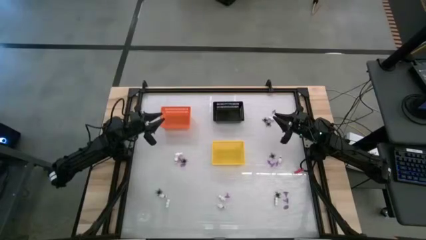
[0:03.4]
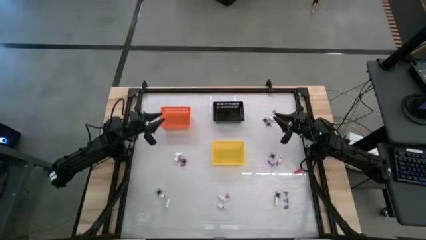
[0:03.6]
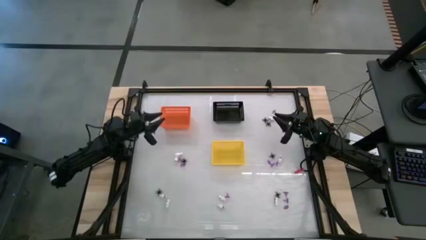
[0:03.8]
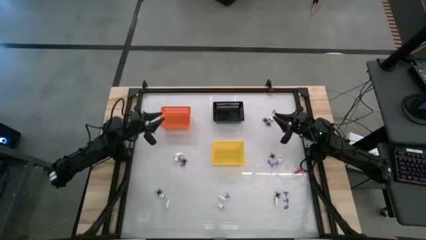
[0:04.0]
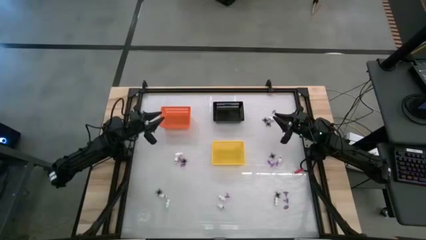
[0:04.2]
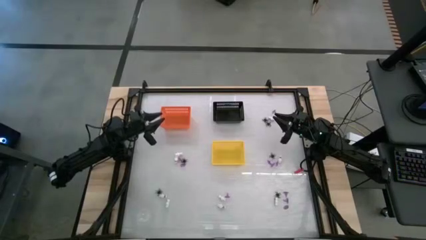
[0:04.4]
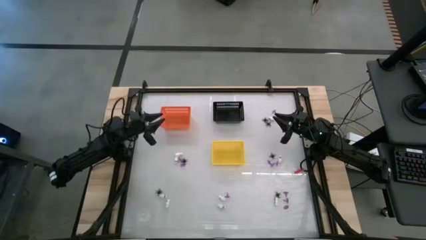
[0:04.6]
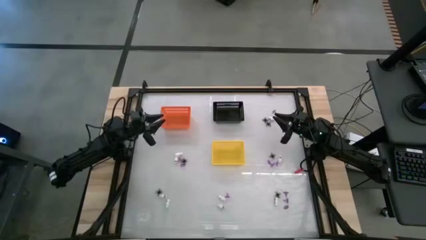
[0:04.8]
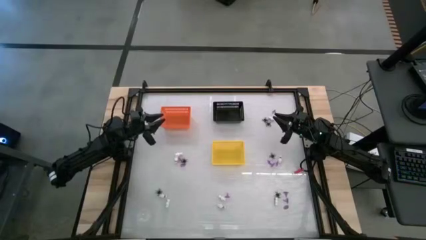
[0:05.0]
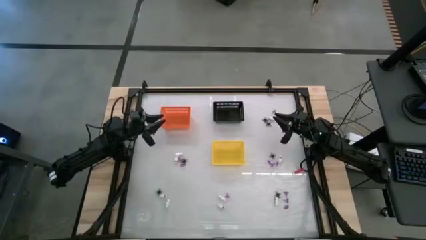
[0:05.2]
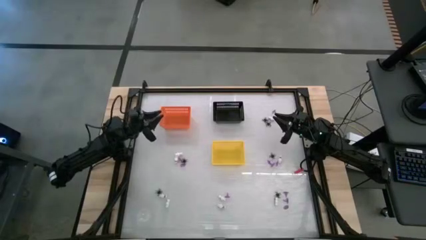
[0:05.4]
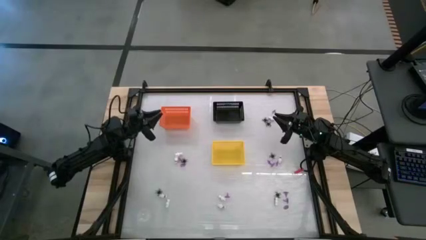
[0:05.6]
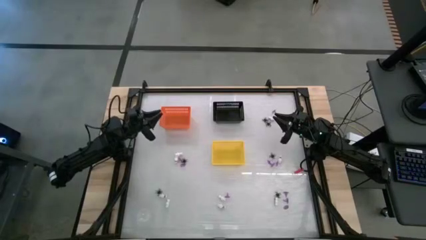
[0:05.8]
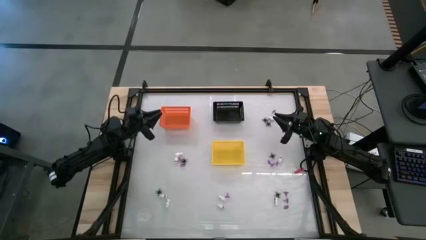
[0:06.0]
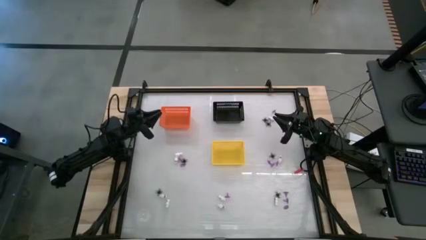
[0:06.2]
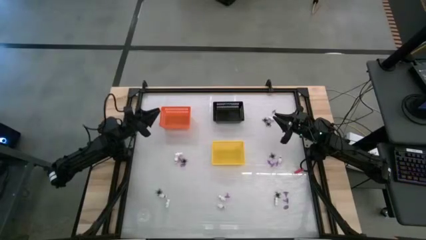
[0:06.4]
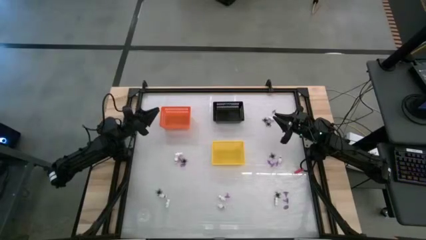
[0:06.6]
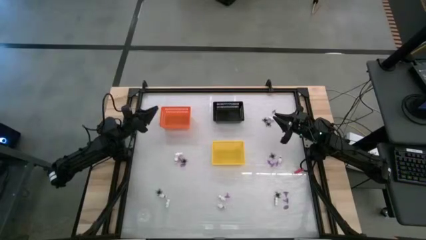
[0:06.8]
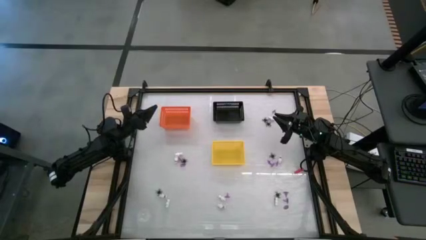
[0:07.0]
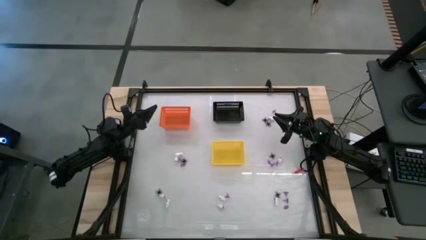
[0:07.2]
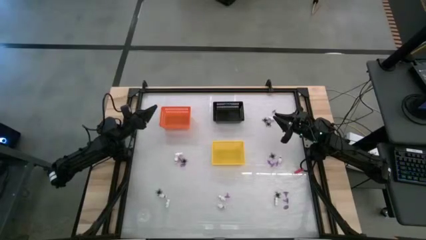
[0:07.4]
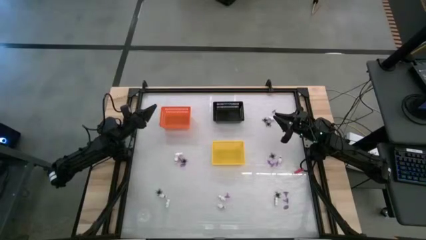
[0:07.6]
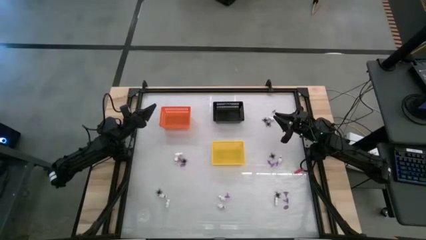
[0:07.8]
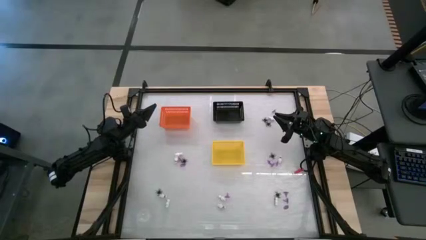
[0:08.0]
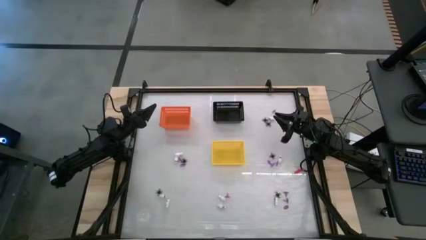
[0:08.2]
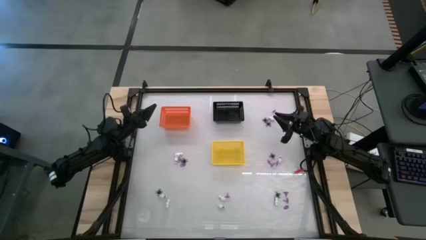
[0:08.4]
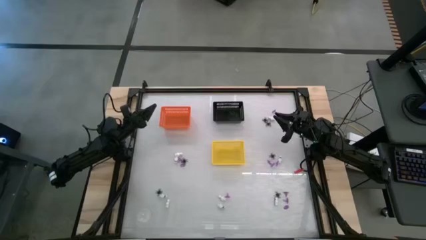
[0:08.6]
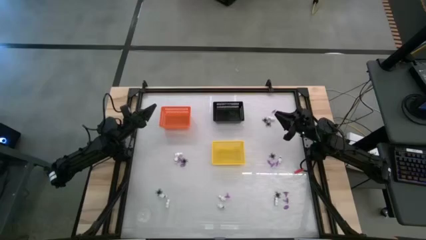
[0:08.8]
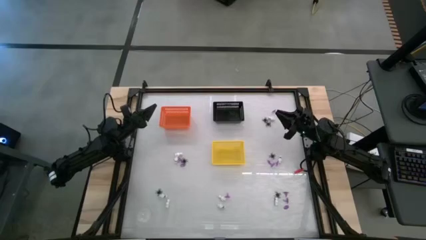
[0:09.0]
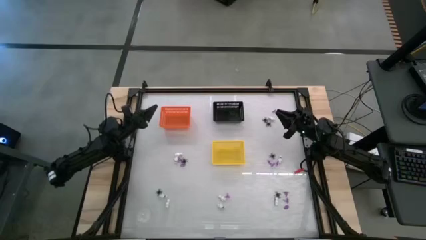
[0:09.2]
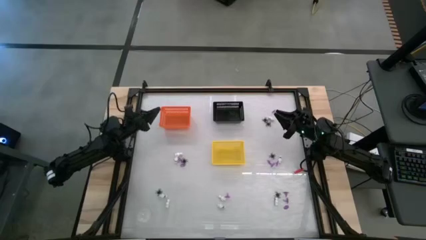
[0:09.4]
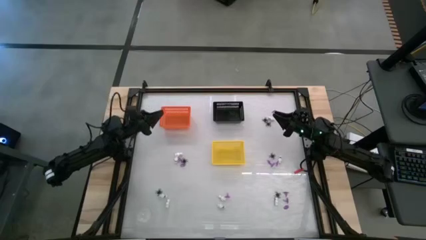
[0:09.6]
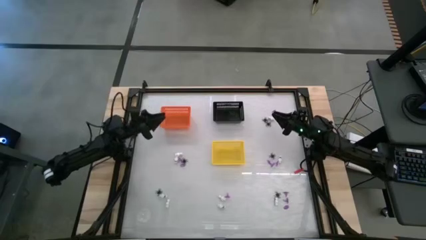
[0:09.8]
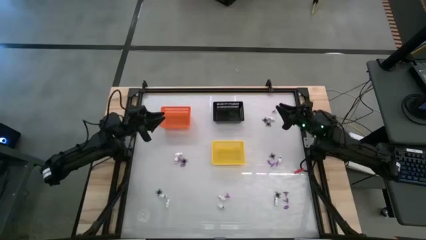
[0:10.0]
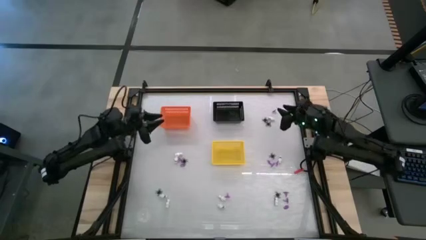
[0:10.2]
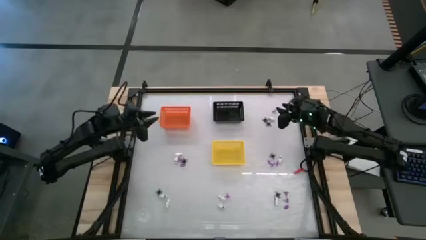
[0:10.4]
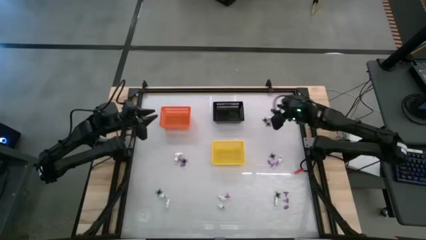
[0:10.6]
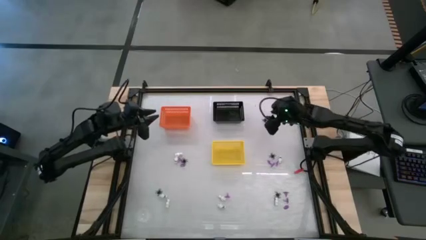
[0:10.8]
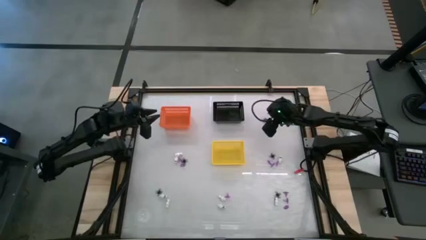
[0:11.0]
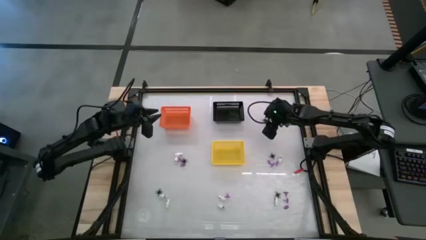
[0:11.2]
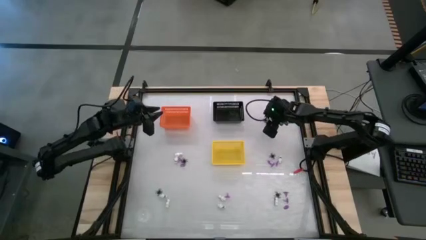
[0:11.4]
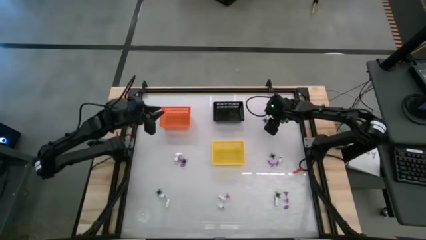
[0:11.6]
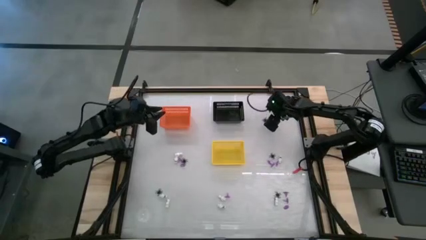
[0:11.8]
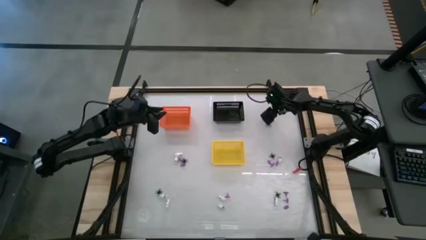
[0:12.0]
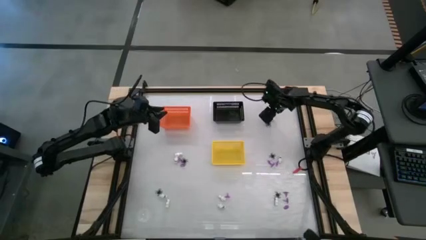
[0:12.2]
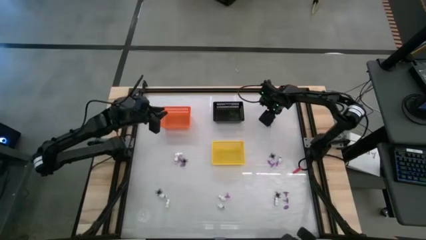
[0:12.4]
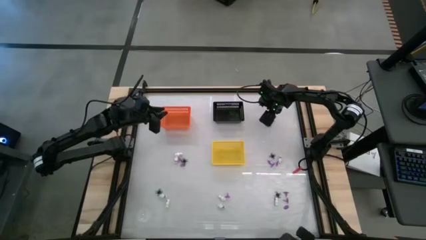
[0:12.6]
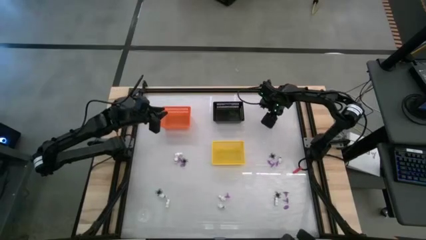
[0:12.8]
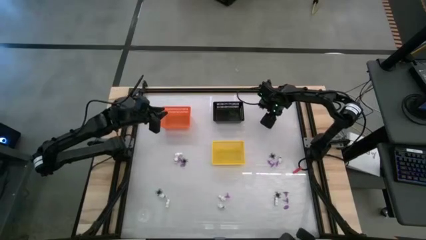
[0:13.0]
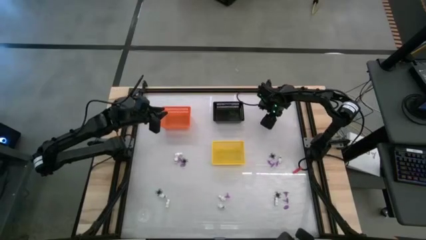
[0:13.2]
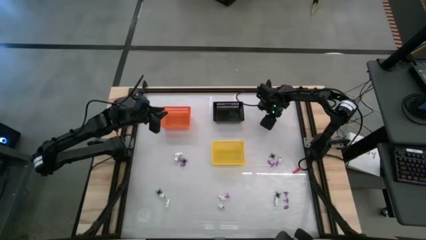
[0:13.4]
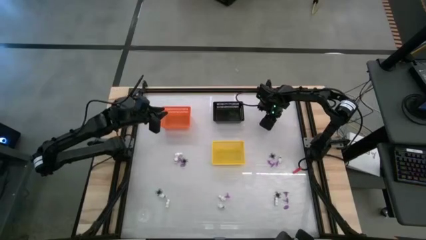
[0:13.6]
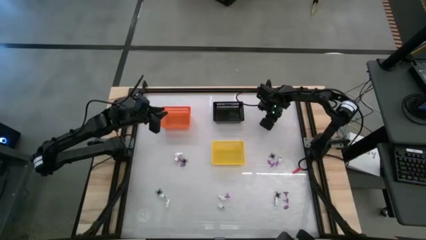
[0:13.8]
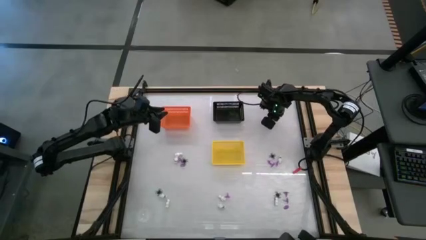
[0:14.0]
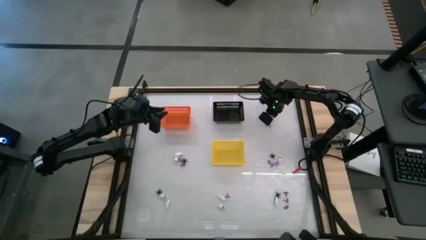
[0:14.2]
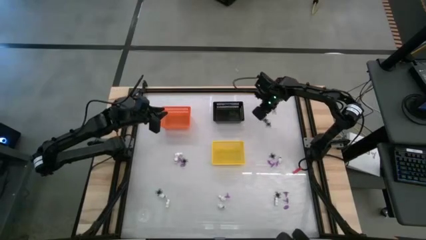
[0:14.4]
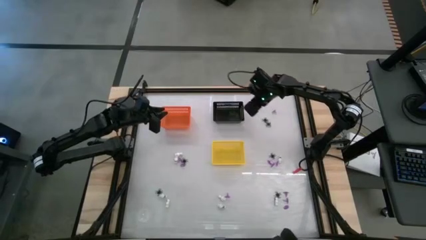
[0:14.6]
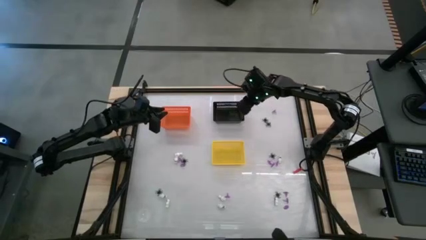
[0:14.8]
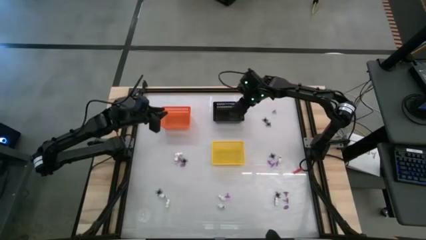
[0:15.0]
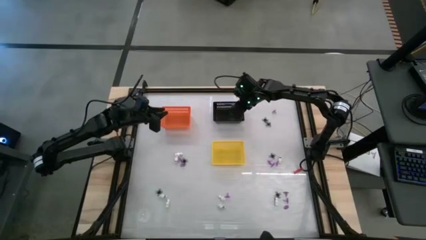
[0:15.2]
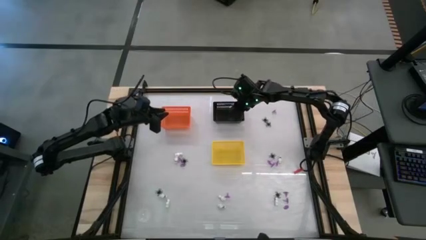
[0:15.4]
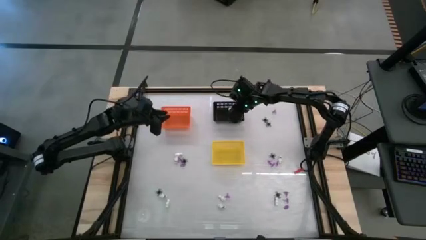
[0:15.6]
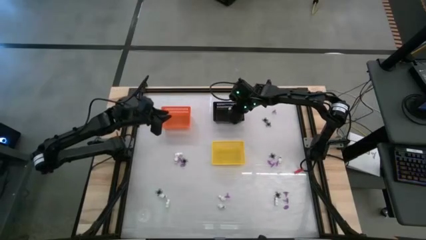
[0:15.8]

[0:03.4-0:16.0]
Task: Sort Halloween decoration
Put the white skeleton toy into the black bin

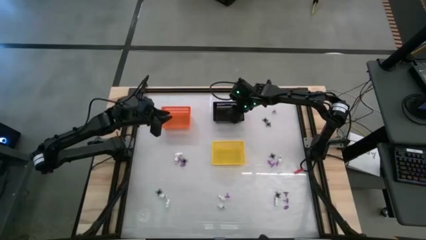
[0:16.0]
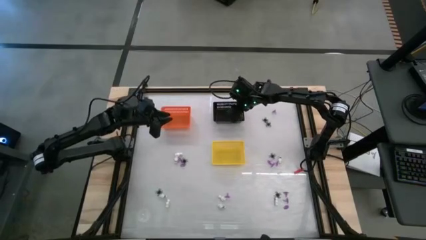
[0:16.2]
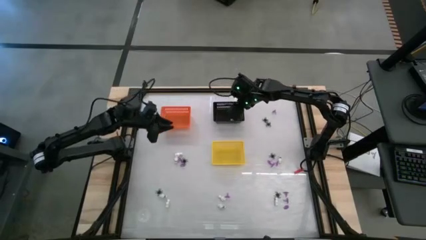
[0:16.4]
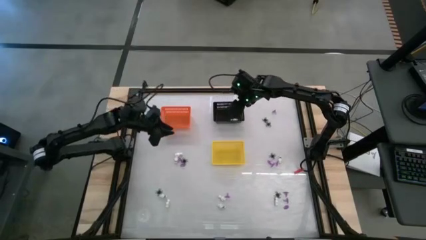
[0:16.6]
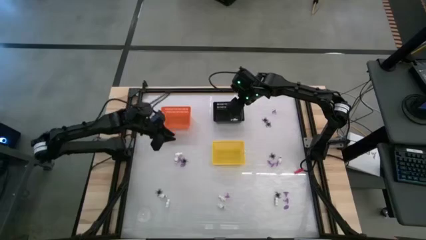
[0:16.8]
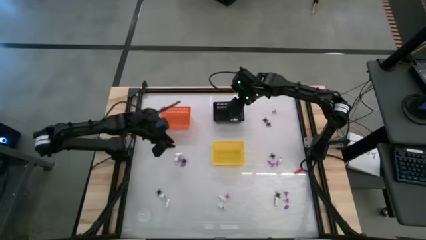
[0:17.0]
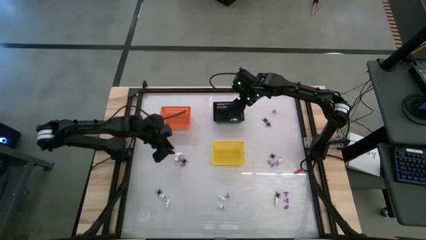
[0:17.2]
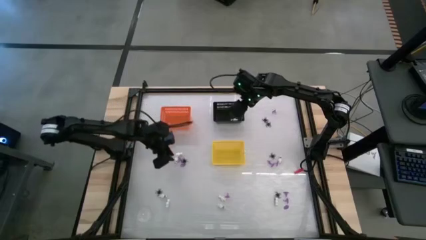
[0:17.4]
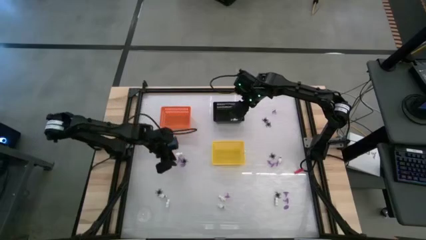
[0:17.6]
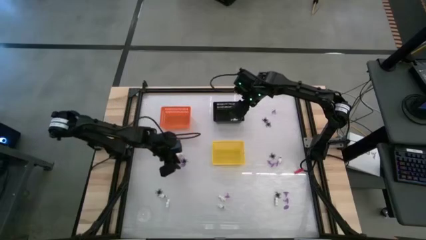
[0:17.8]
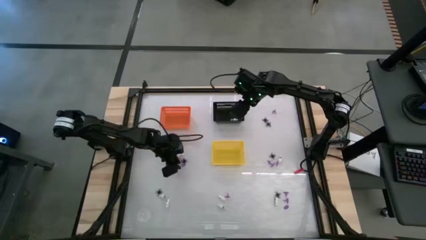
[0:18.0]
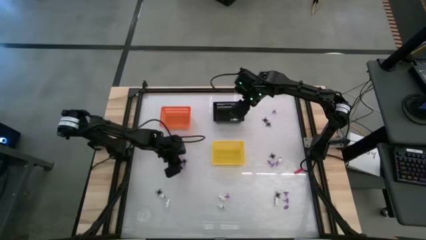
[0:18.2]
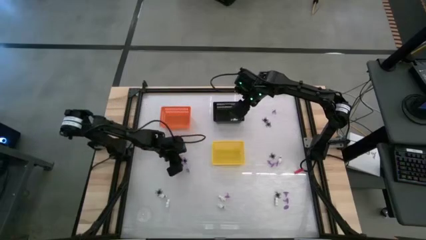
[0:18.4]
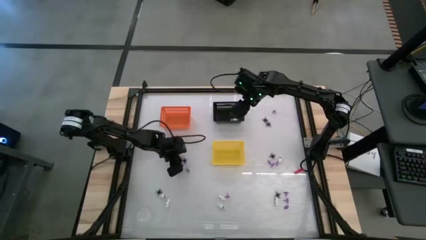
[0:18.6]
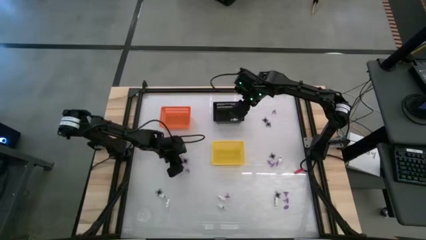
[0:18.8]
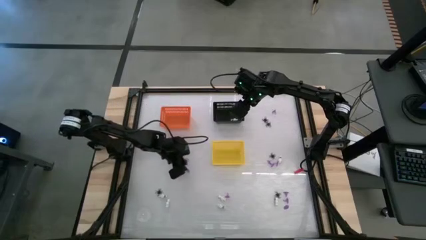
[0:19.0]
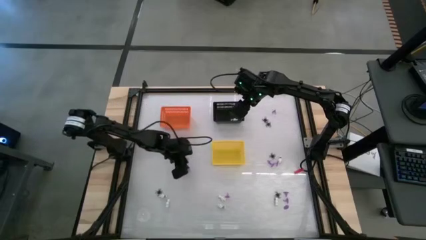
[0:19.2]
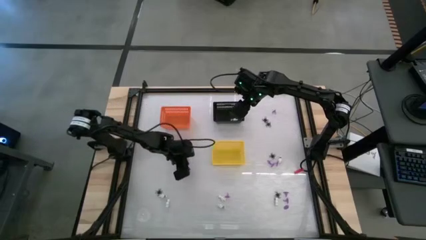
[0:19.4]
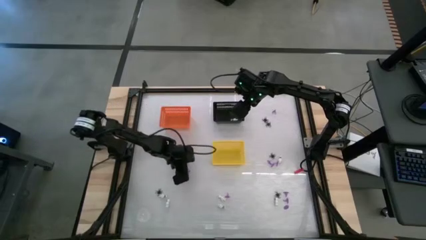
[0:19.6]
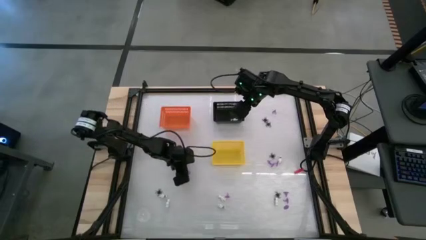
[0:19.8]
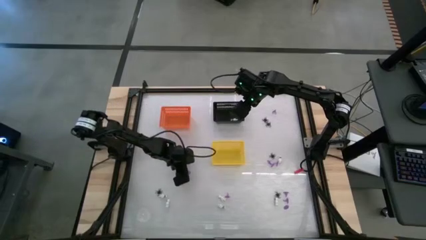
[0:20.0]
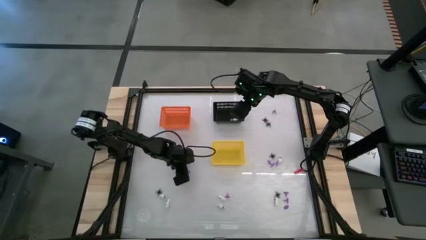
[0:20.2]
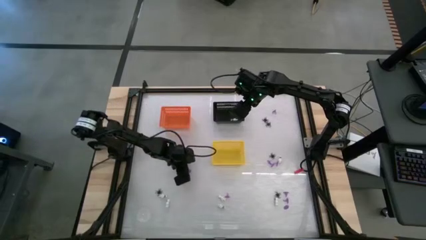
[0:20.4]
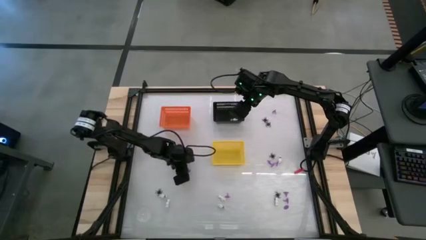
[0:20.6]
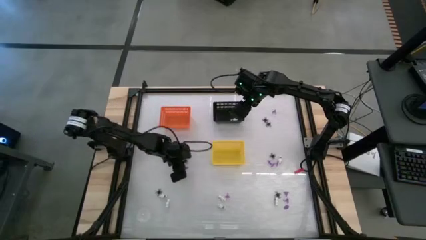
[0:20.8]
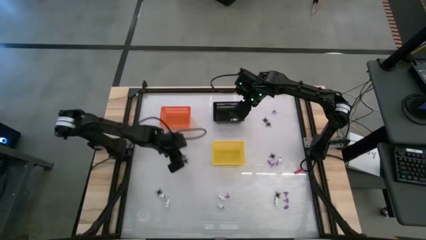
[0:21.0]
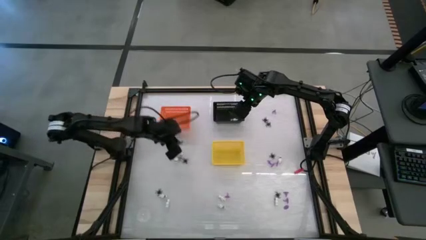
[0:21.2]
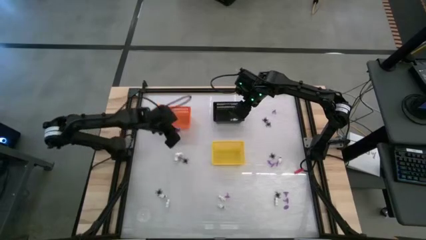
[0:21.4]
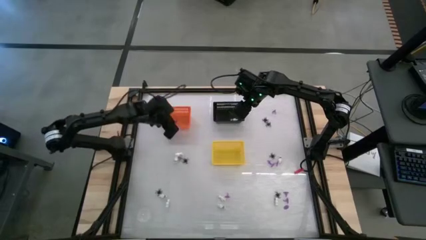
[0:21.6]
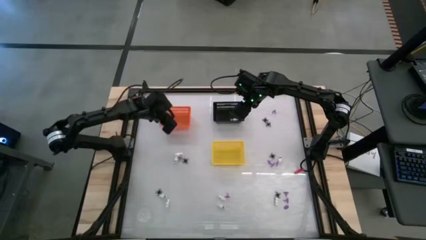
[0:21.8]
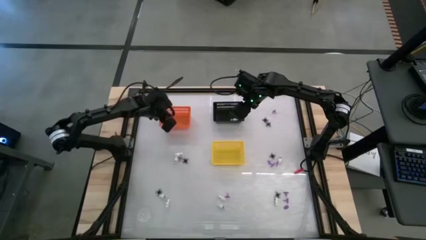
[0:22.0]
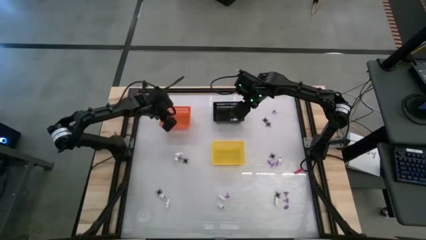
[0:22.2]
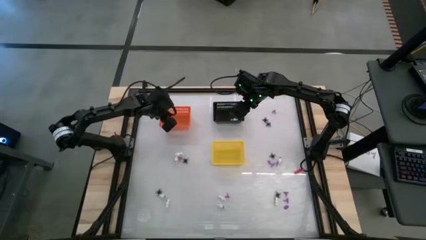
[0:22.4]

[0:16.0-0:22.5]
Put the violet witch hat toy into the orange bin
